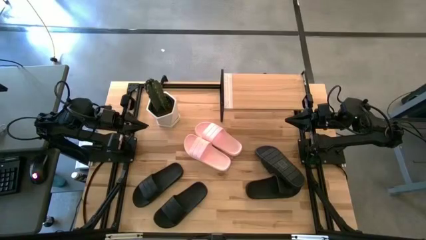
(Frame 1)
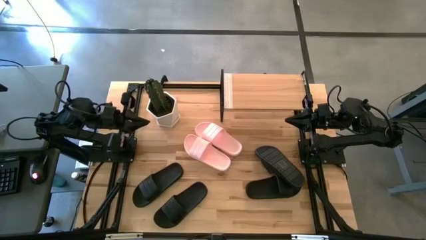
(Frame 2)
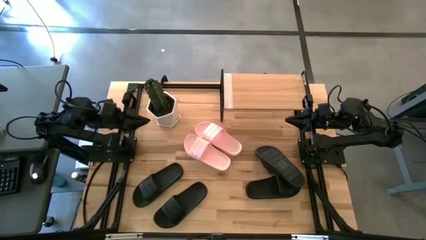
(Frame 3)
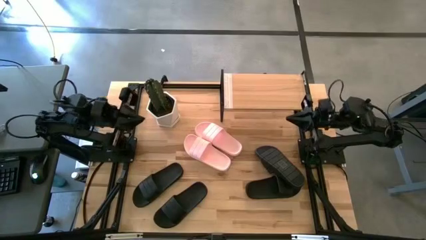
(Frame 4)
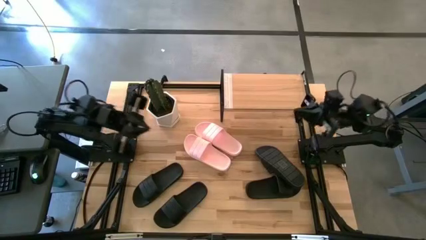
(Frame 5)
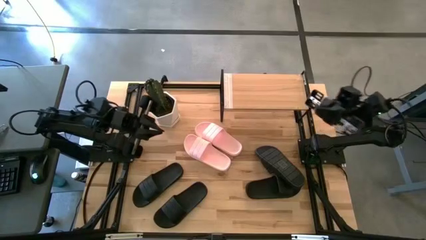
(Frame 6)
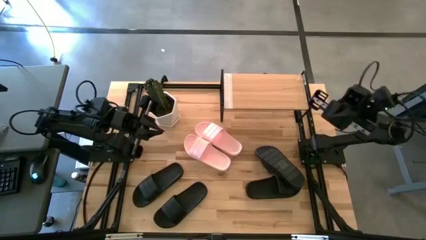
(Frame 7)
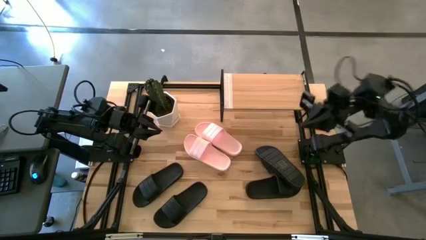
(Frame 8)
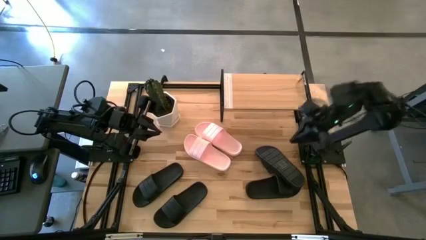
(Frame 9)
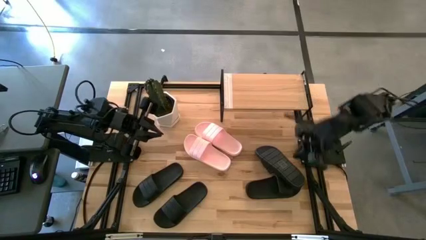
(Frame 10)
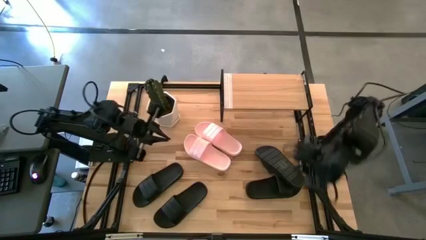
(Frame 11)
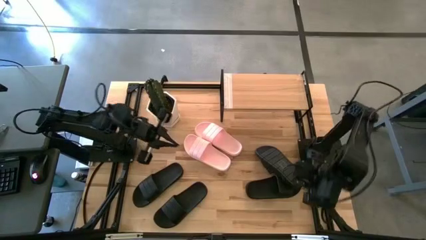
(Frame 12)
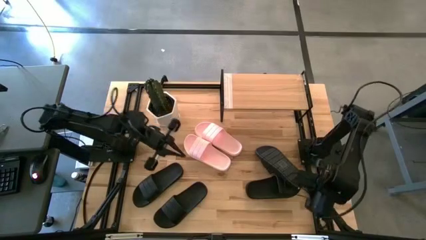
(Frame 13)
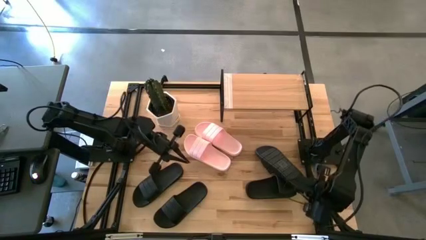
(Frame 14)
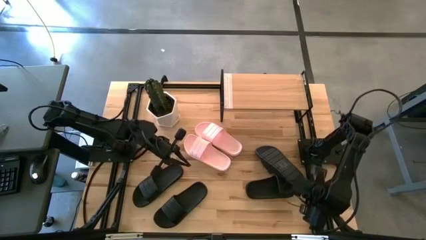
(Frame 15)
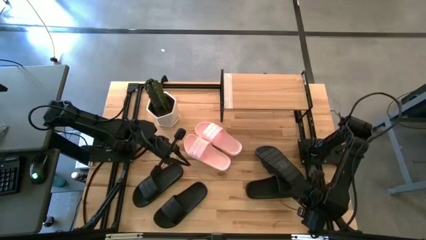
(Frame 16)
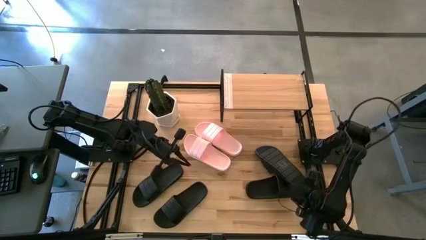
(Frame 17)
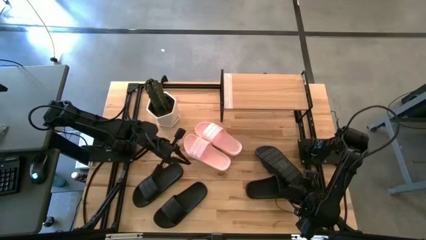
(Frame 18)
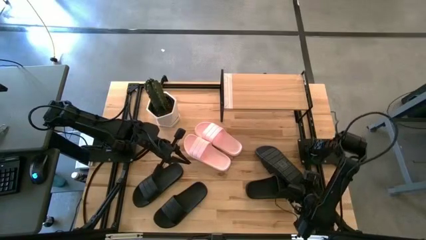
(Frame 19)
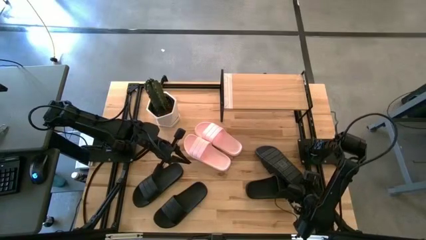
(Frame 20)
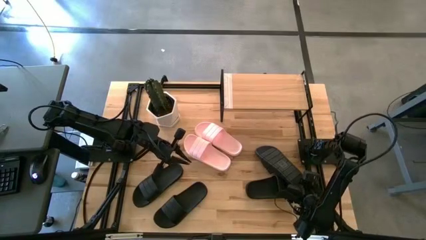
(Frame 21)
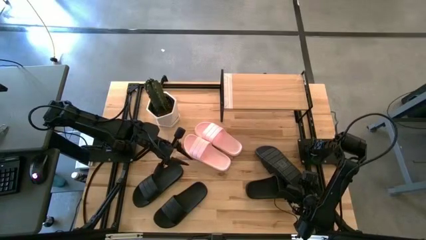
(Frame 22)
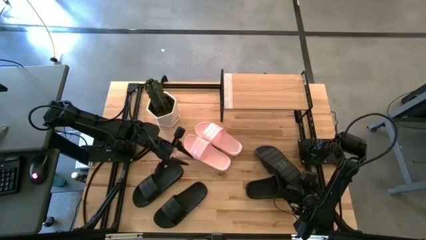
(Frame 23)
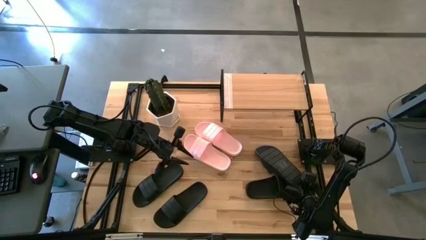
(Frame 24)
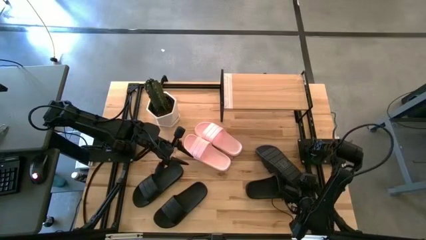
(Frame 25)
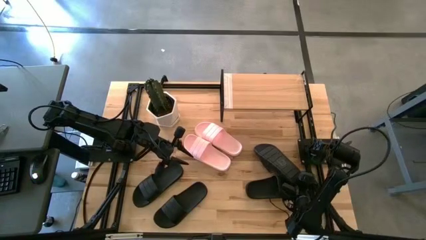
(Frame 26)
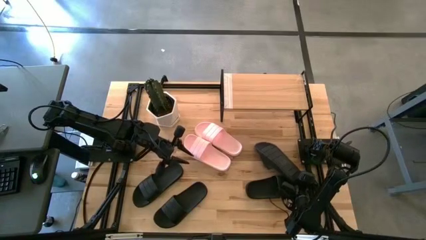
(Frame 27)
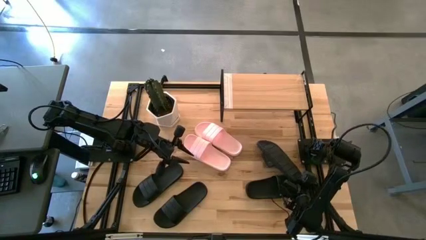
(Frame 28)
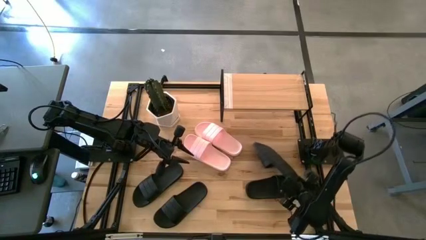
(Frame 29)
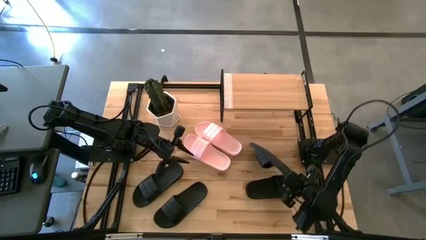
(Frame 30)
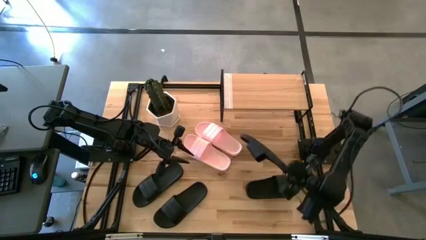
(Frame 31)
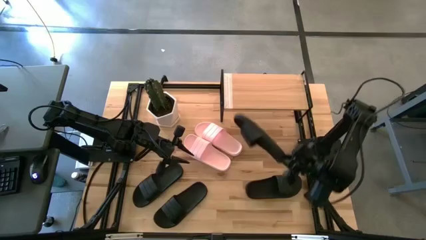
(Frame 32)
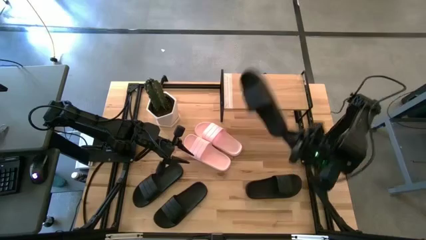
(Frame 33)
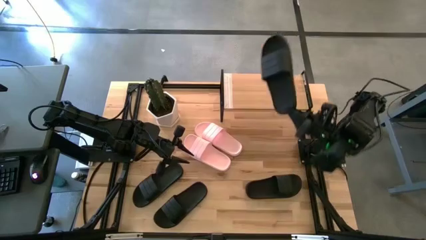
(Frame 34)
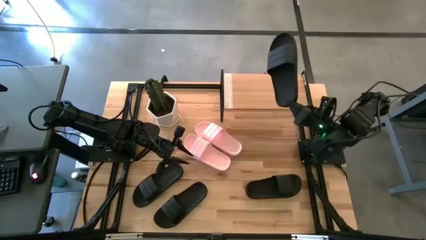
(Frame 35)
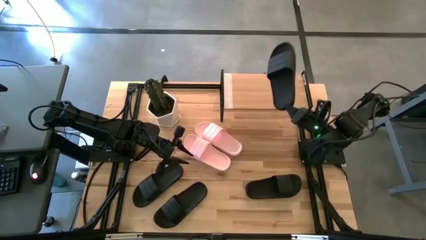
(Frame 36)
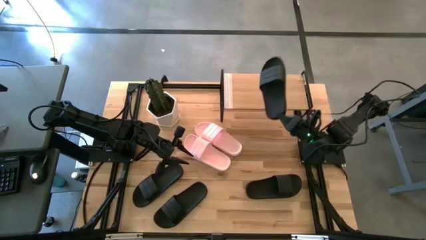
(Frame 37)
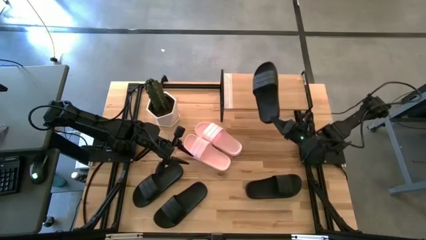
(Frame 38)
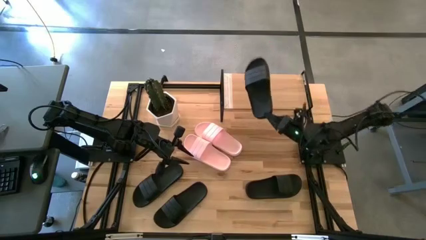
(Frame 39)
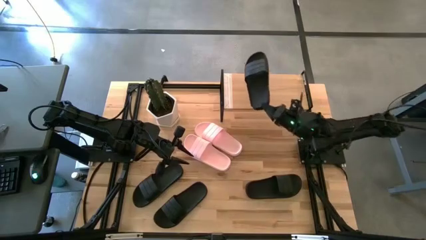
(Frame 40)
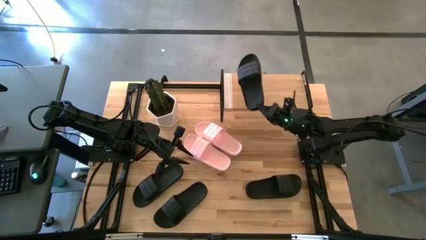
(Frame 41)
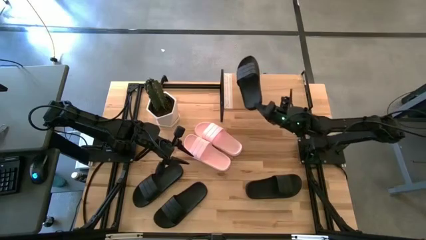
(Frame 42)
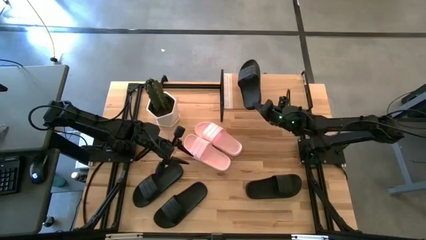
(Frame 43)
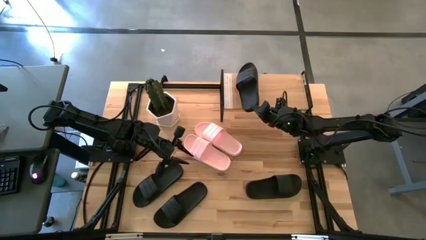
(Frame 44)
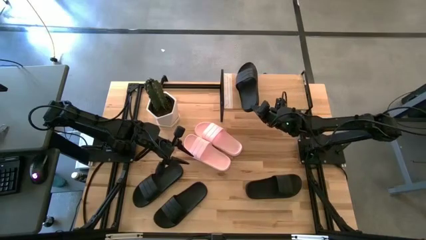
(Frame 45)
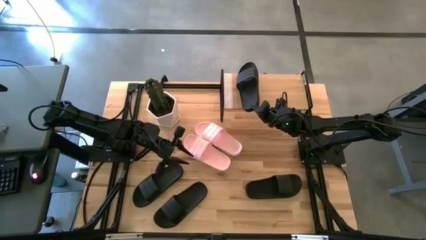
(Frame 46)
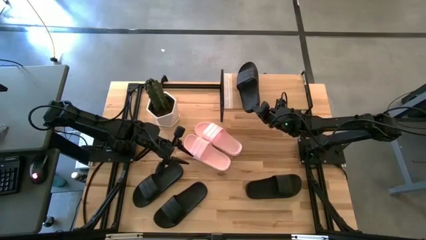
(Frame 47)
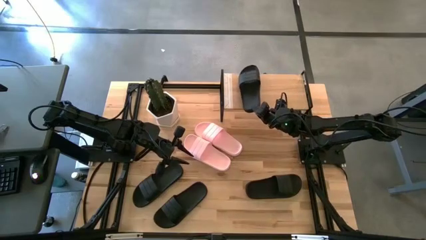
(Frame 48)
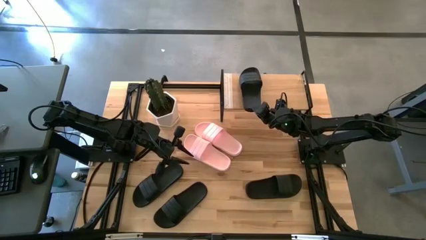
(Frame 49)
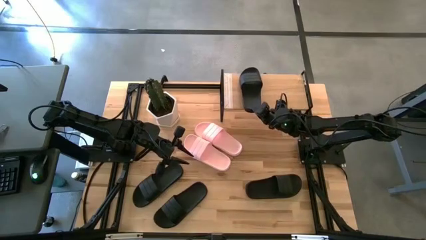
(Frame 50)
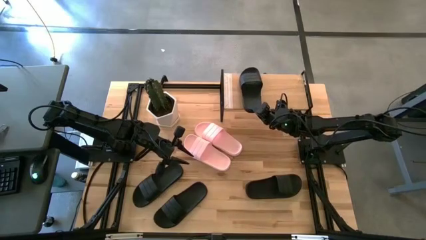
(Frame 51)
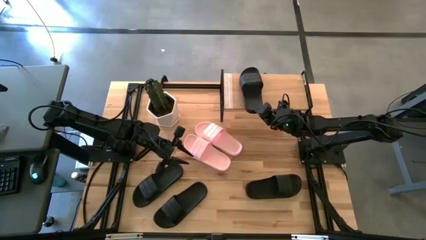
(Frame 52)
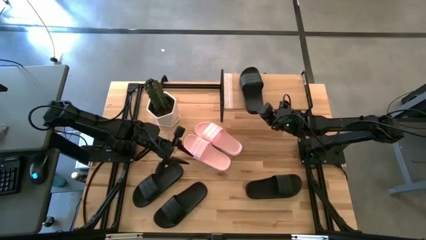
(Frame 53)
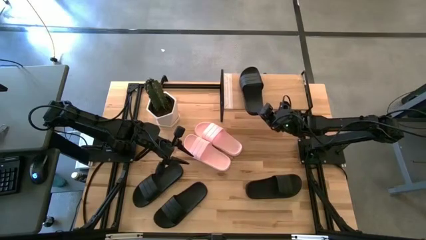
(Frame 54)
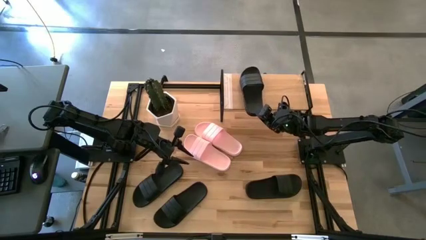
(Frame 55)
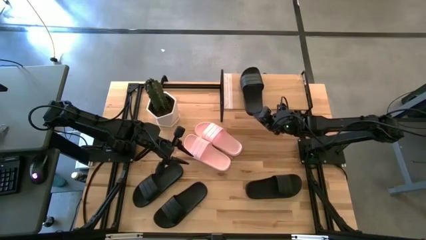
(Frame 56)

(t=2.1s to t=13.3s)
Task: Pick and place slides into the shelf
Put the black slipper on the shelf
